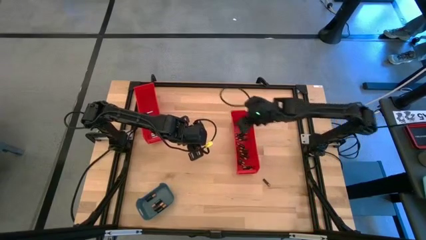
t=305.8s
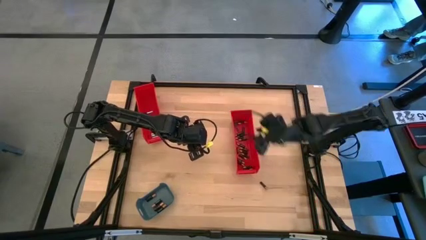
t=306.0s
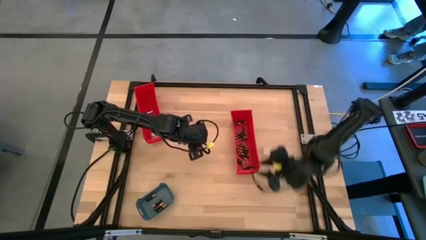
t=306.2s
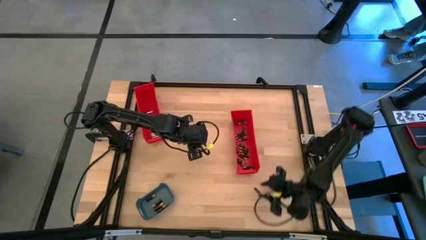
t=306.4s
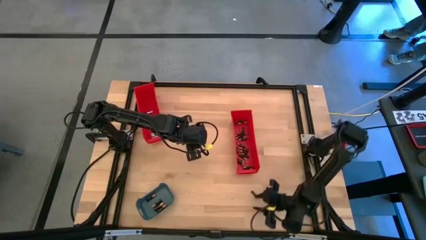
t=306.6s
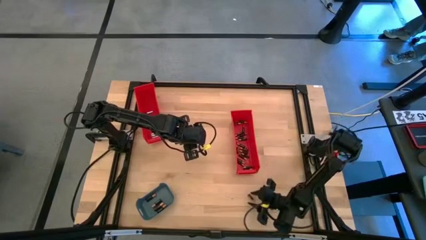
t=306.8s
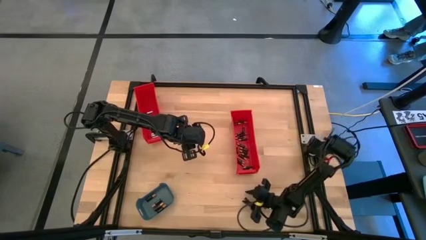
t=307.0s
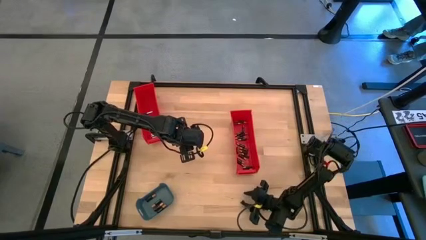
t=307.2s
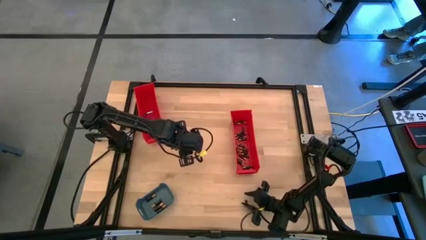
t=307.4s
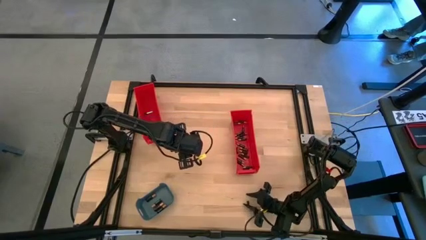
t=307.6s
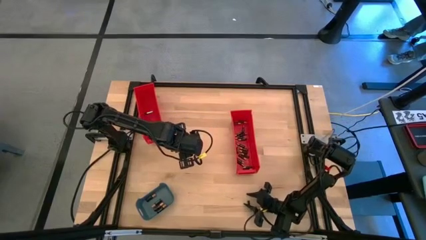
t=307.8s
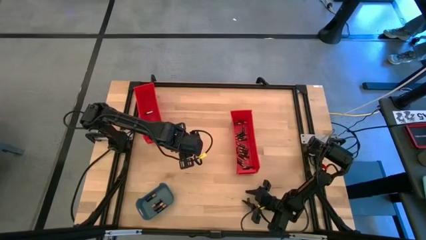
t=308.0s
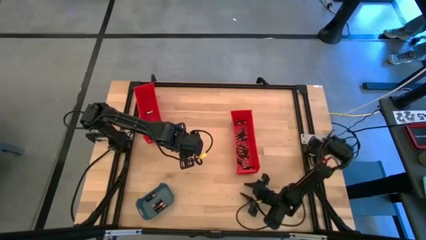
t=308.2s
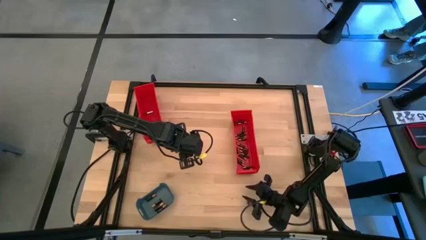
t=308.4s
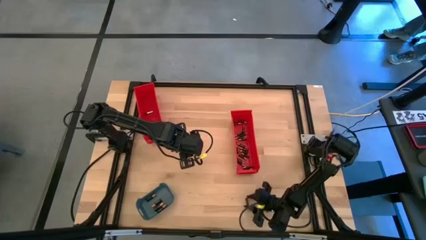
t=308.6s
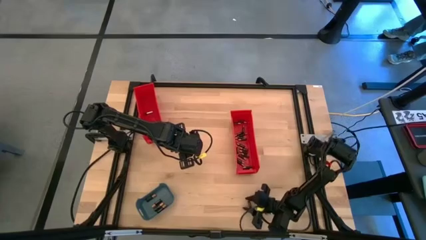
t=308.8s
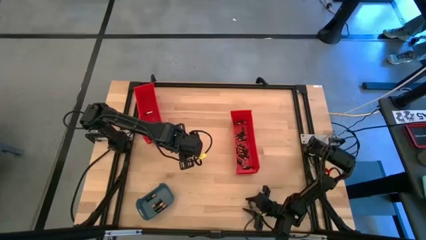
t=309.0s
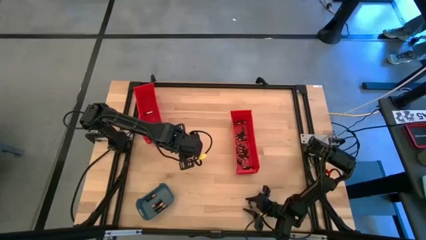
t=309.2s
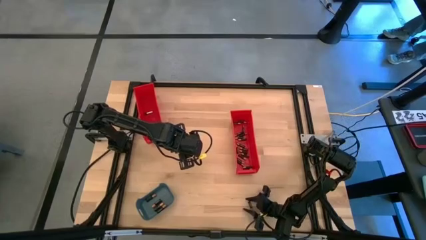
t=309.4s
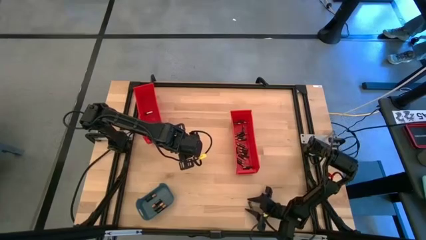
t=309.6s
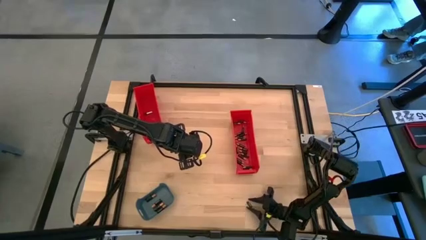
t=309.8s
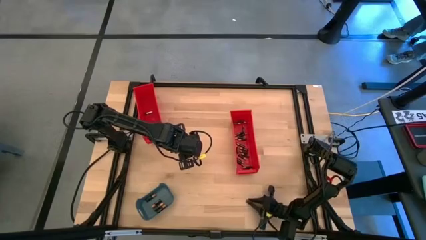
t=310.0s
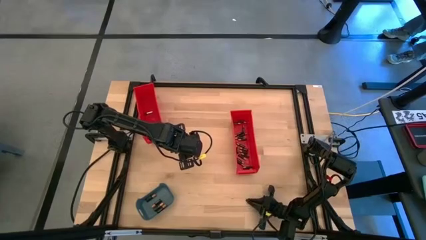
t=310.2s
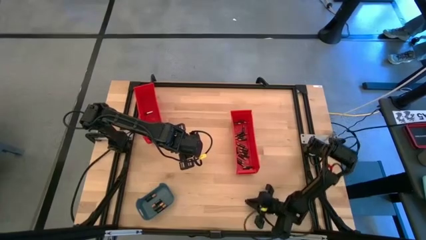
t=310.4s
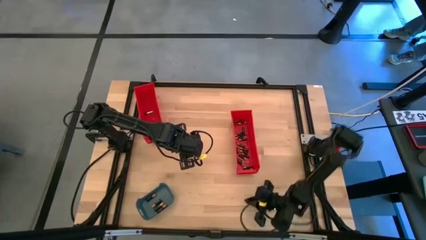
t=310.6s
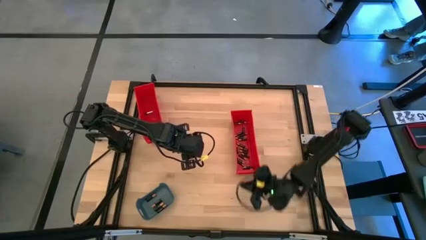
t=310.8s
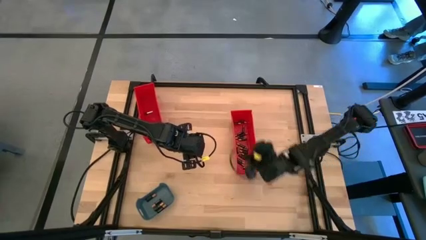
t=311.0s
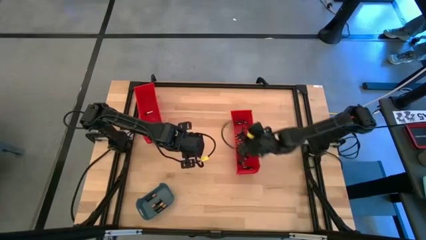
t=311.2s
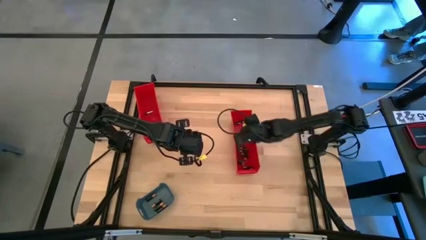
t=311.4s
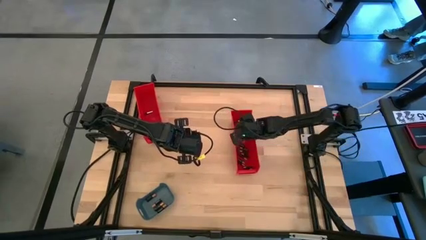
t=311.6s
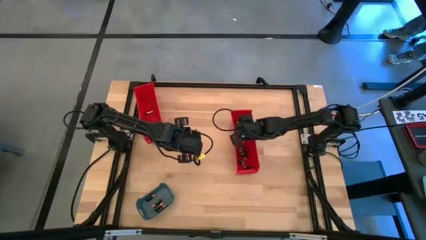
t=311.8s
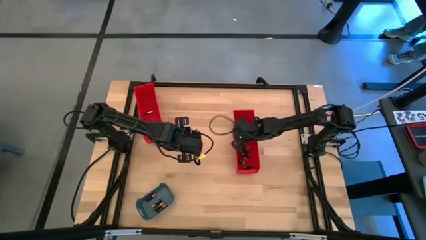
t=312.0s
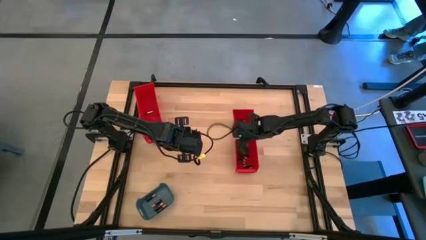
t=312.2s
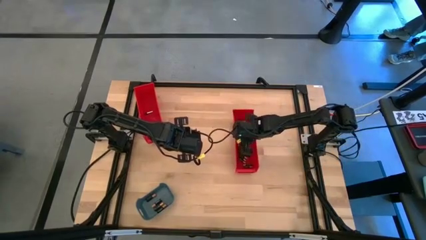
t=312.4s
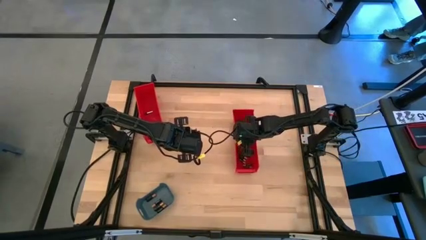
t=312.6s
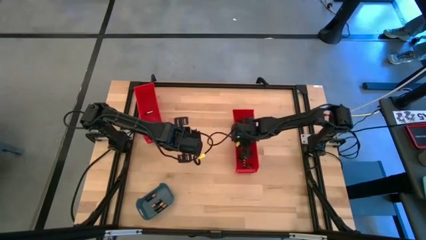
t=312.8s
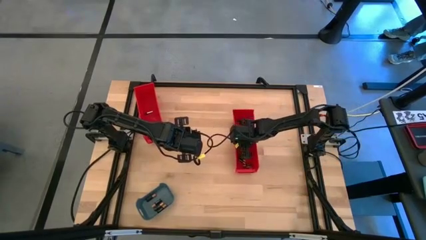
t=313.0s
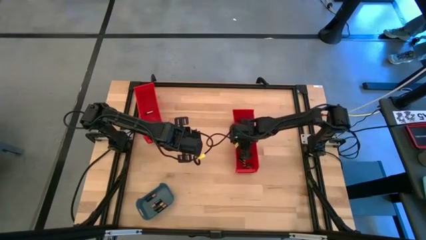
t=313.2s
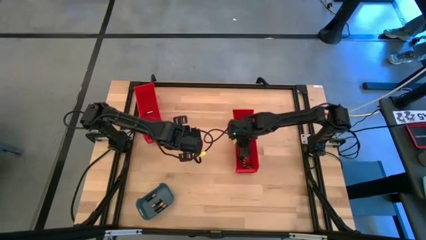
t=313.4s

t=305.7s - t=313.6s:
Task: Sort batteries
Put the small black battery into the right red bin
